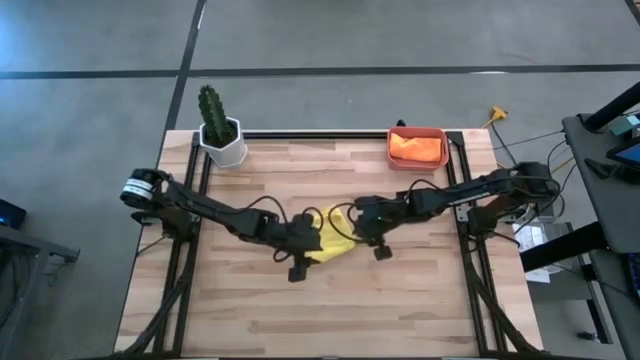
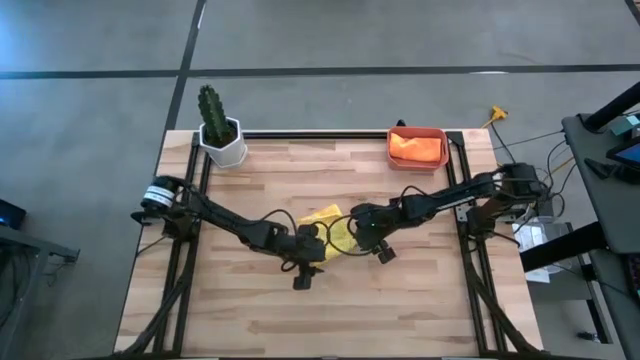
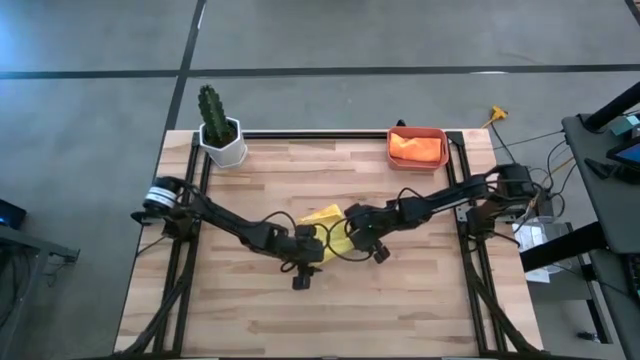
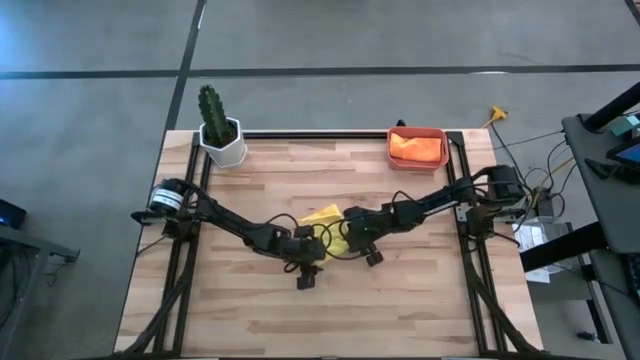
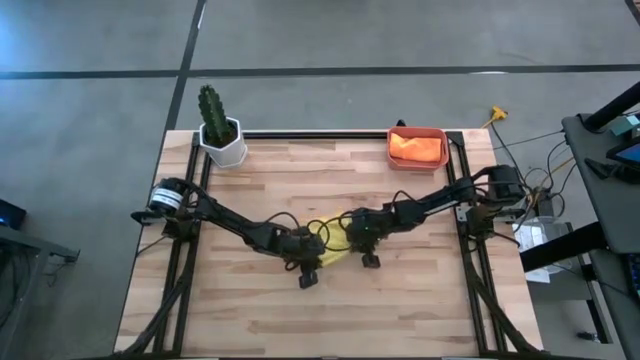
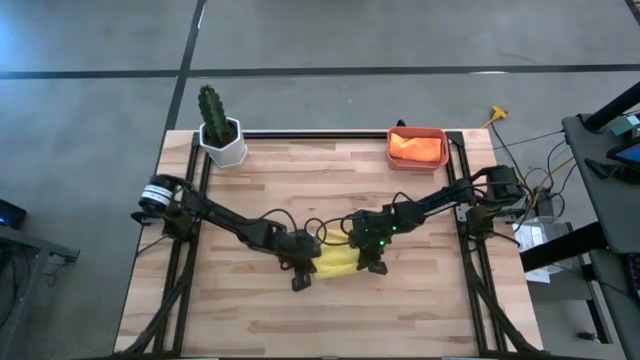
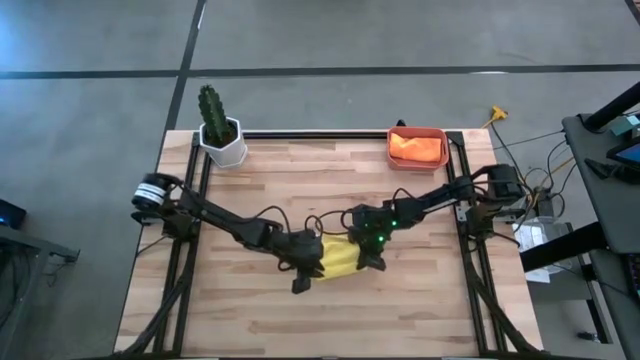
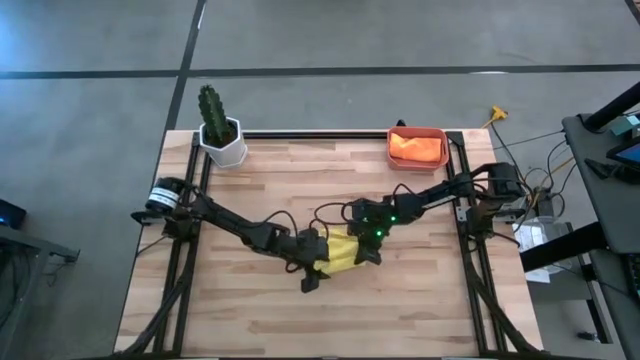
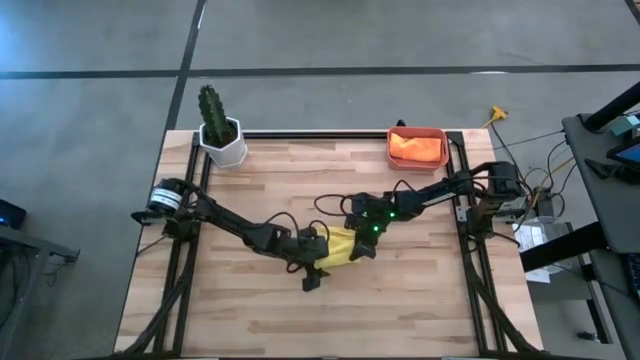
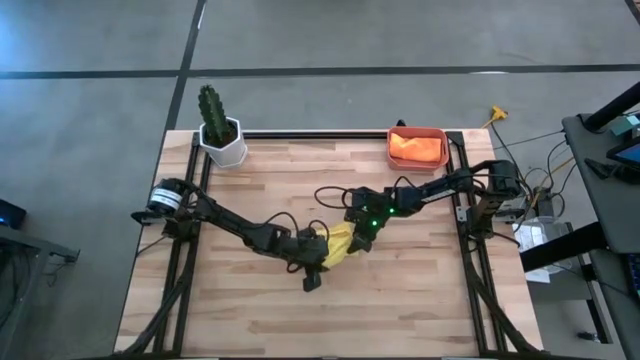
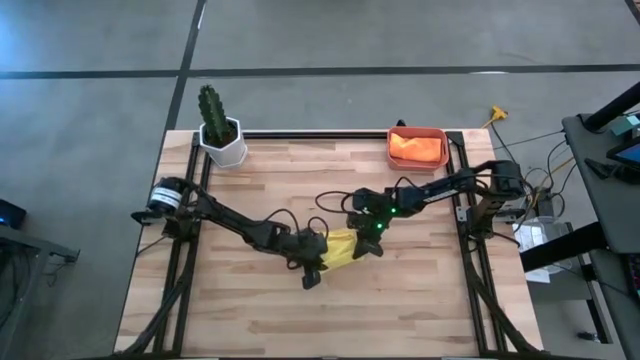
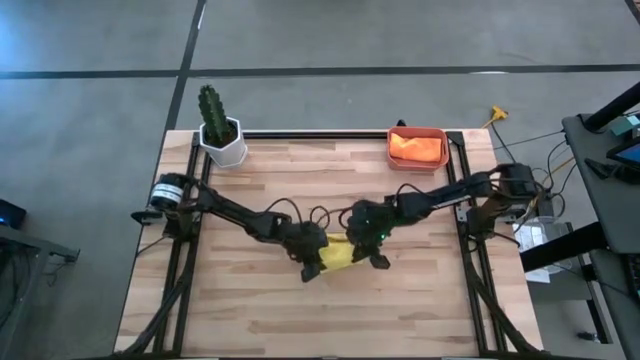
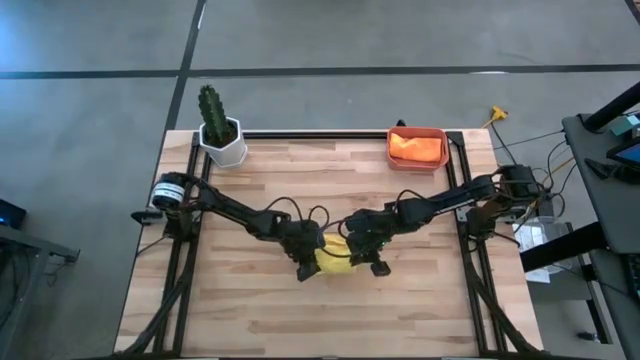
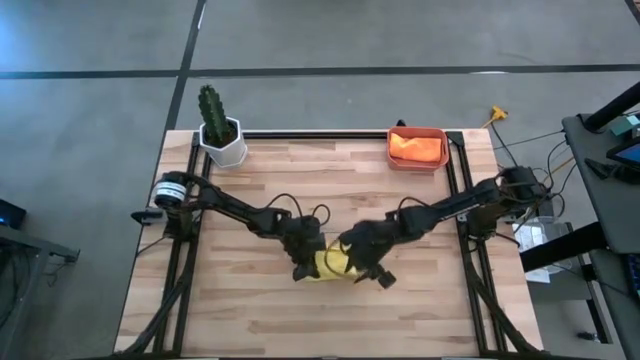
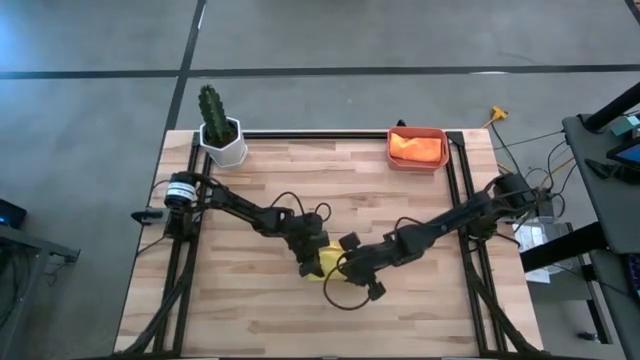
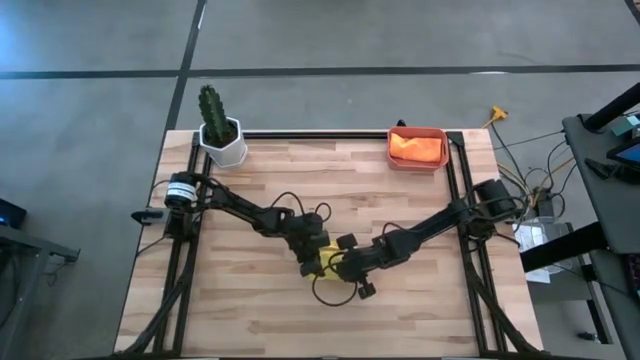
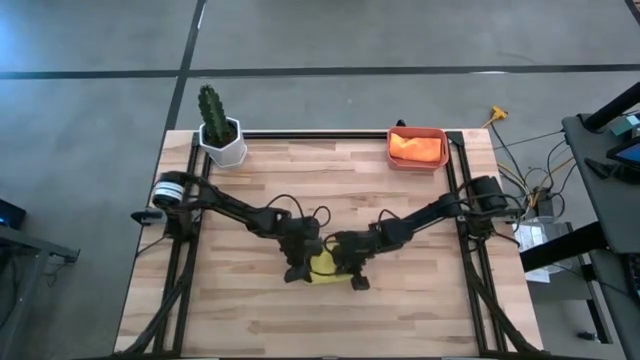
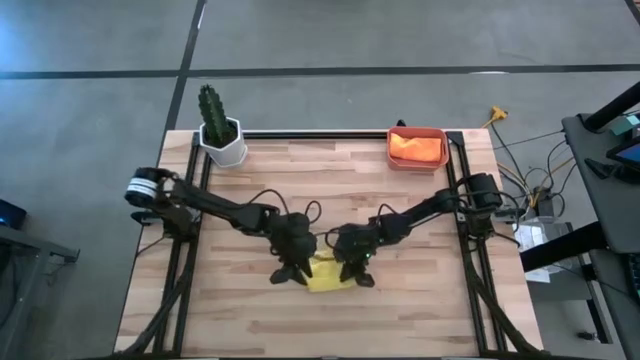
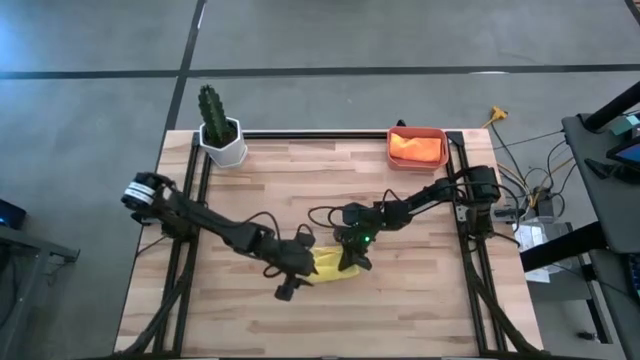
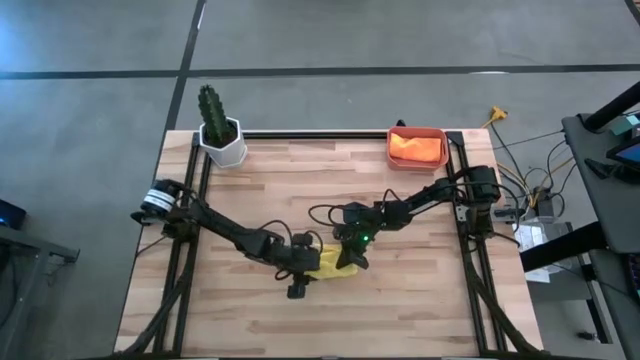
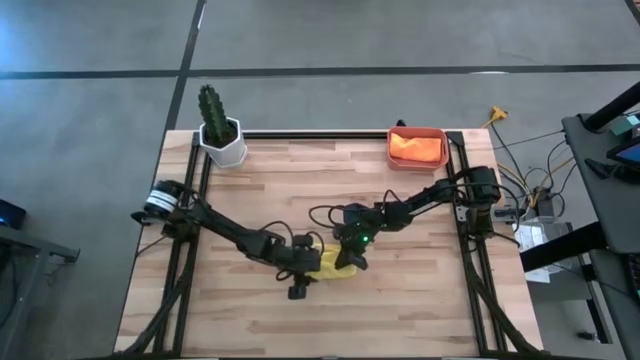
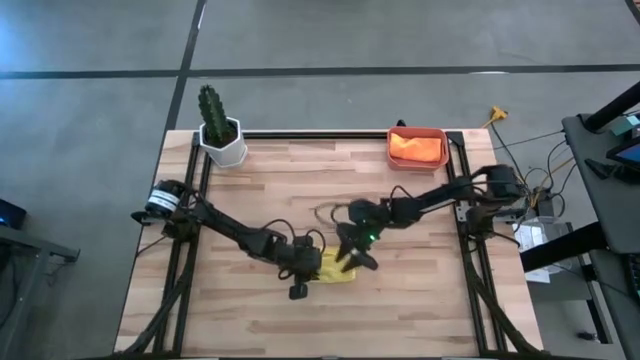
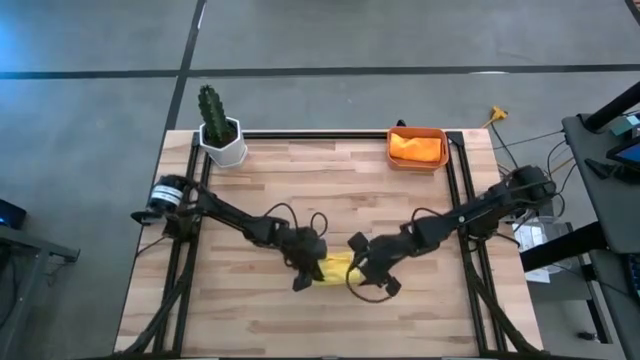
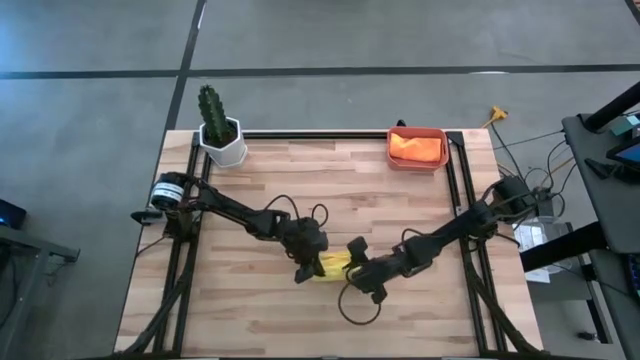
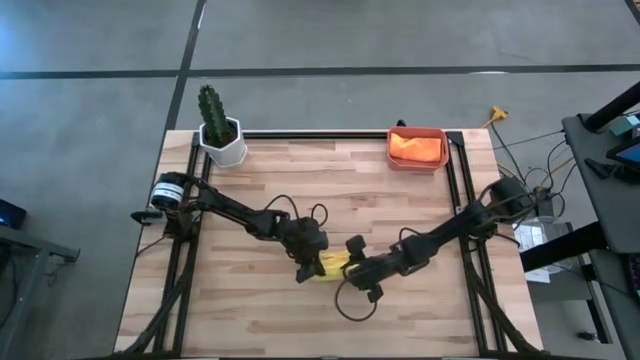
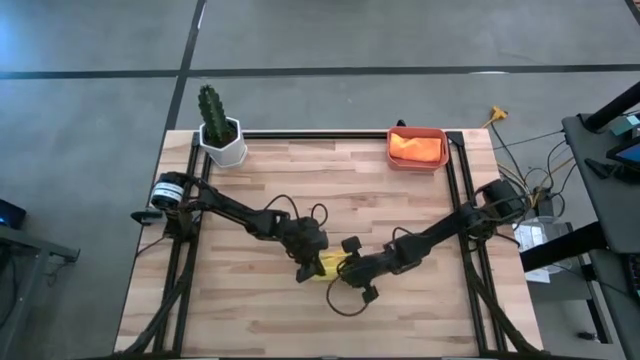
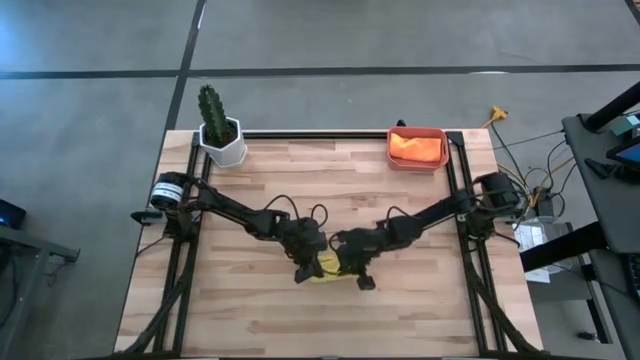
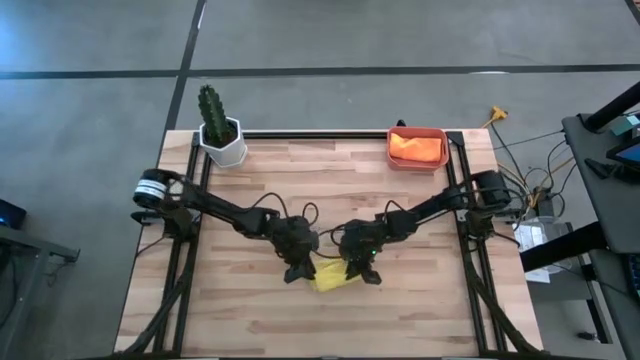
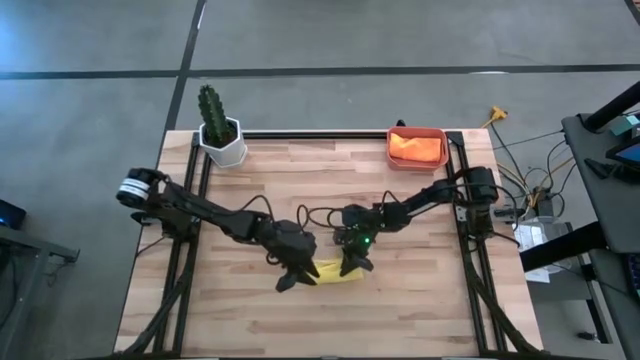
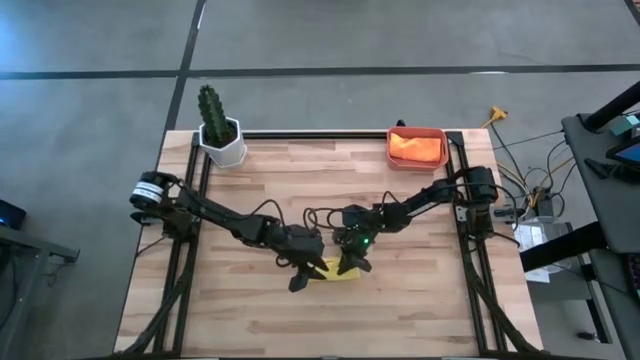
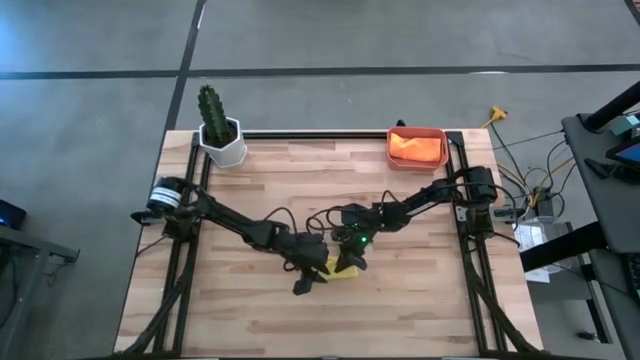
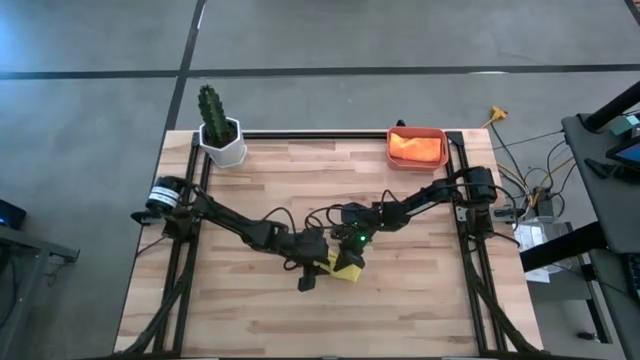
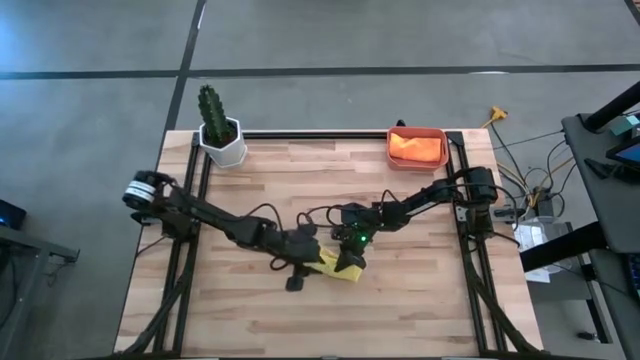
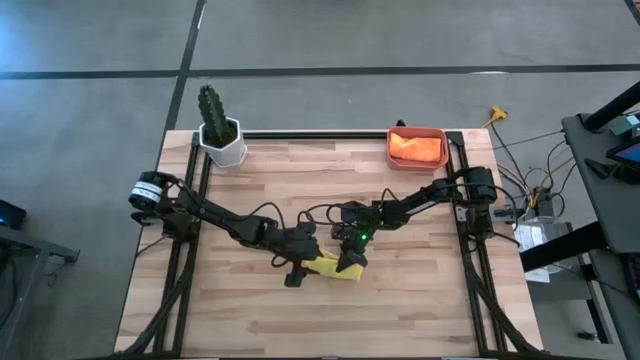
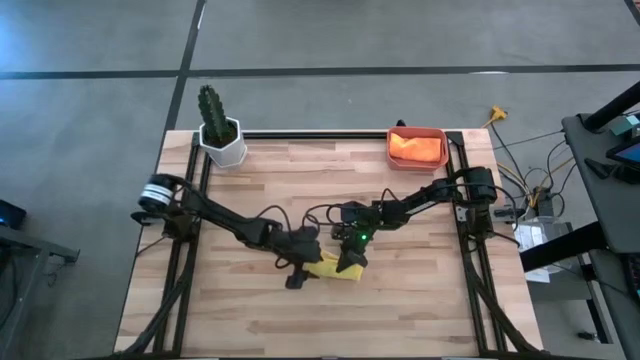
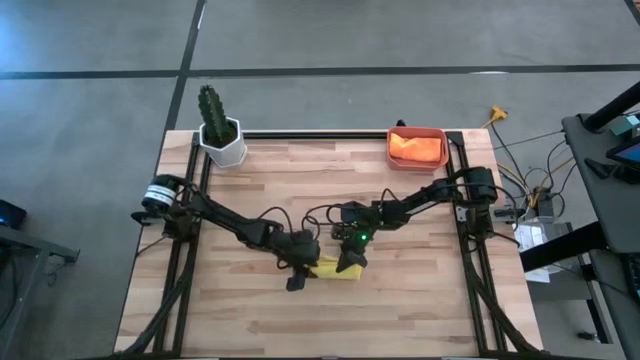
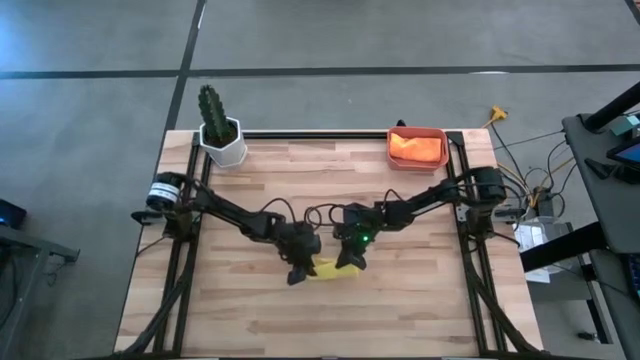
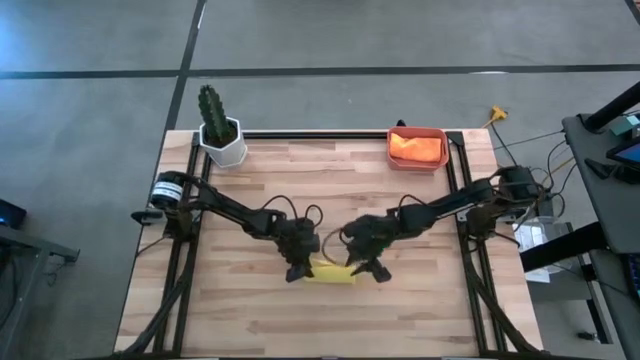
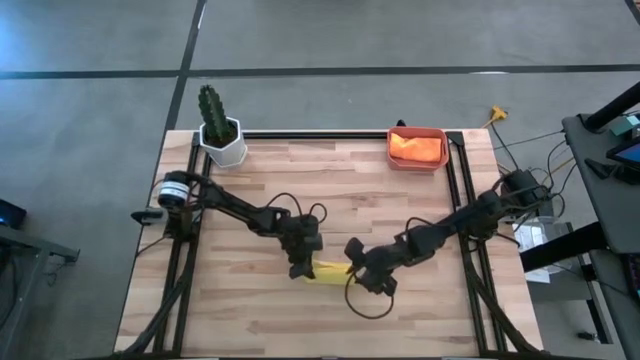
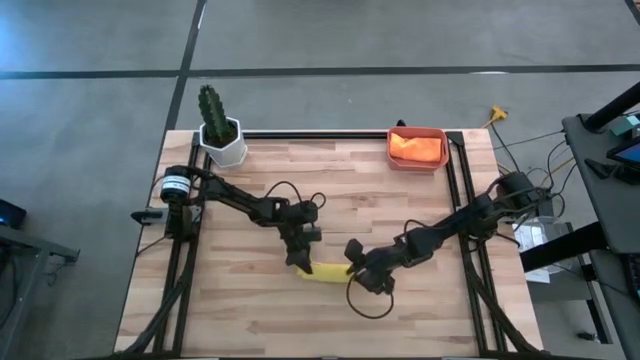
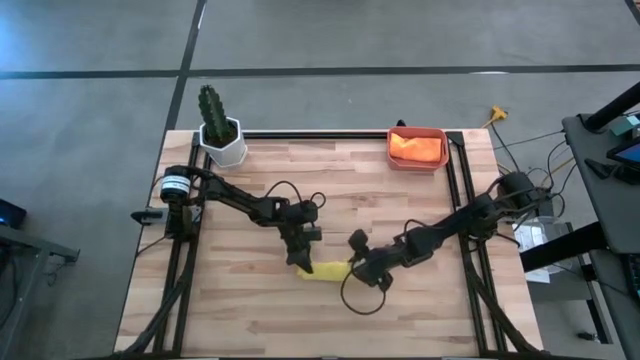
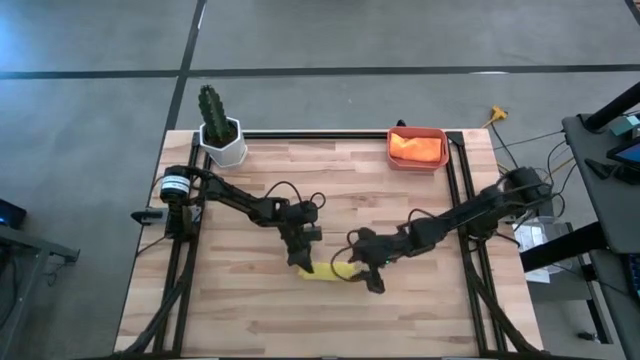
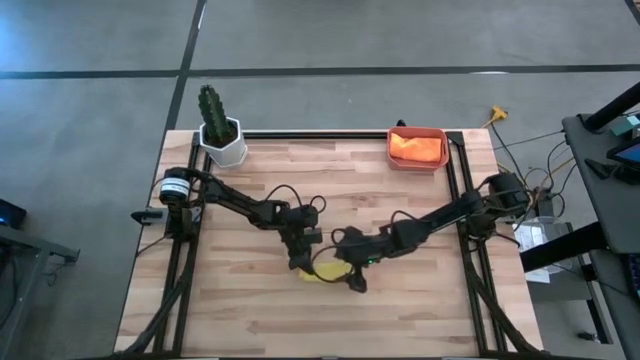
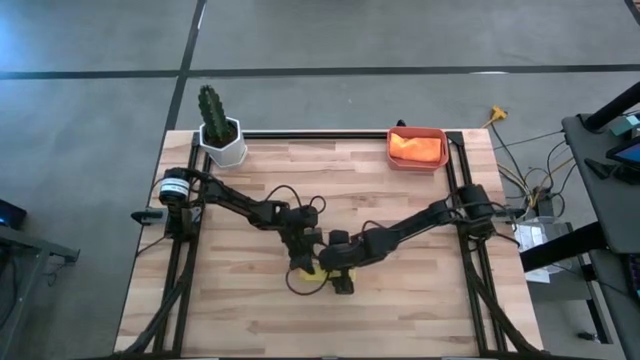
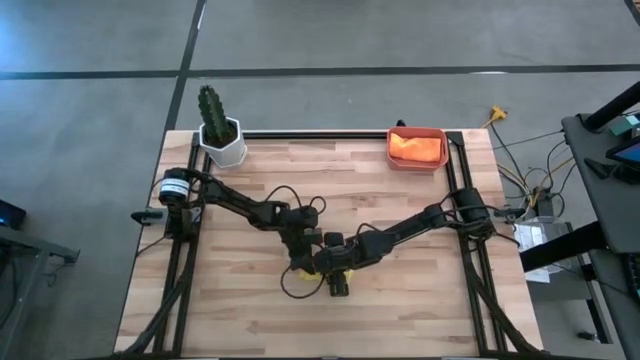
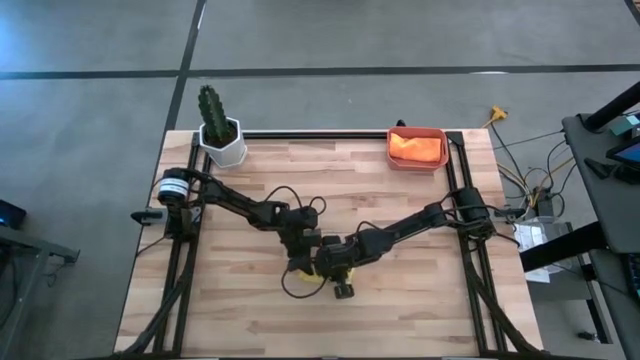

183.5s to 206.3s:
Task: Roll microfiber towels into tight, uniform cylinder then place into a basket
Roll the yellow towel
